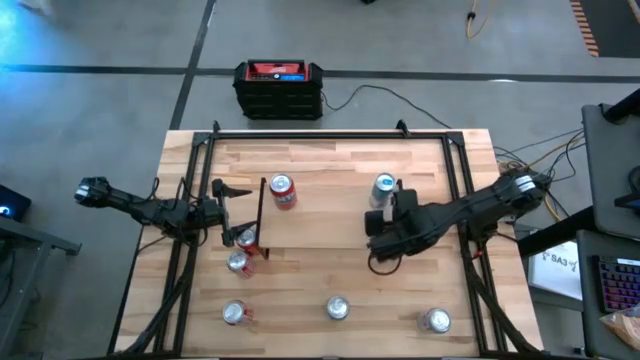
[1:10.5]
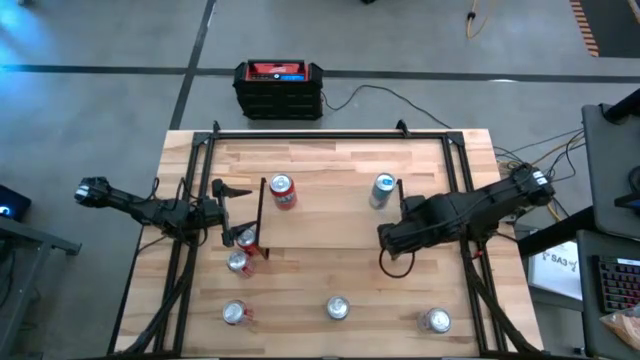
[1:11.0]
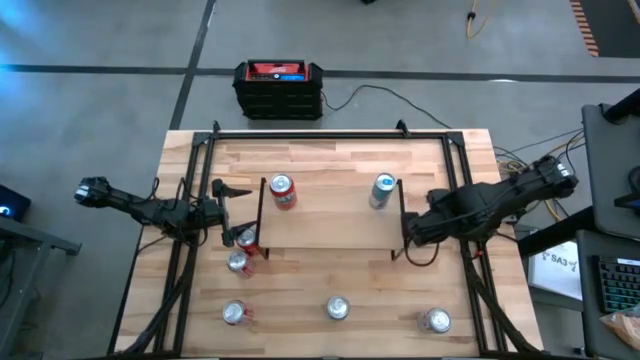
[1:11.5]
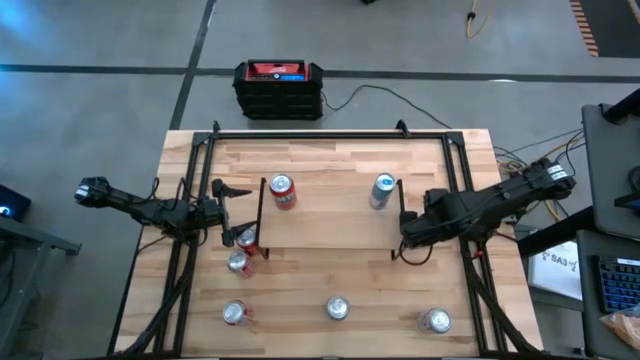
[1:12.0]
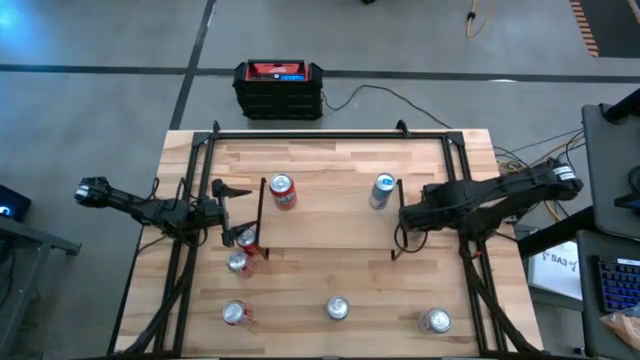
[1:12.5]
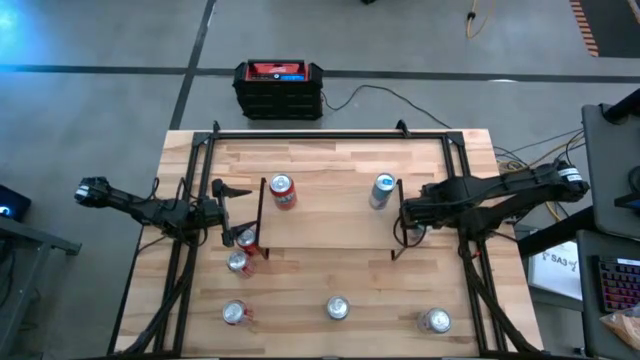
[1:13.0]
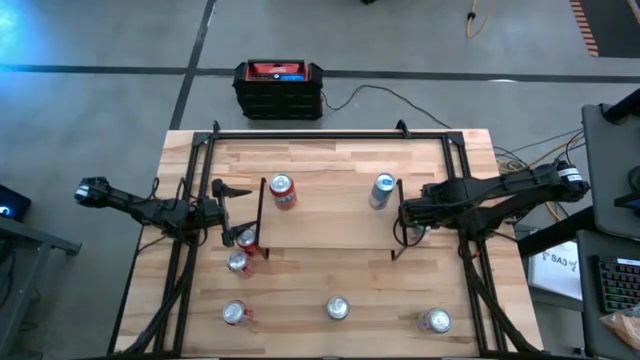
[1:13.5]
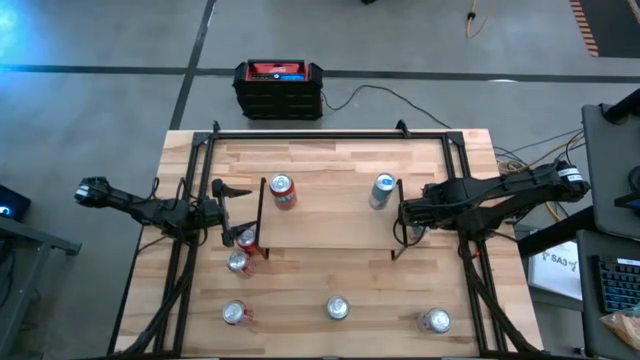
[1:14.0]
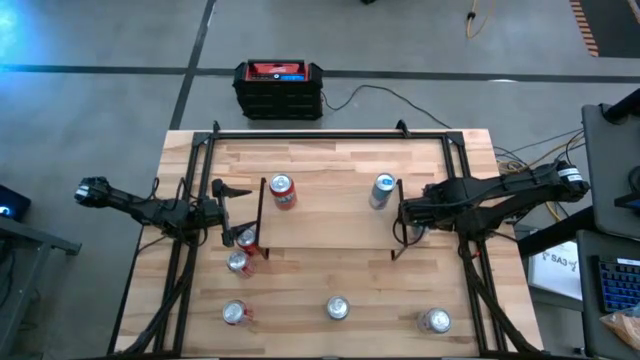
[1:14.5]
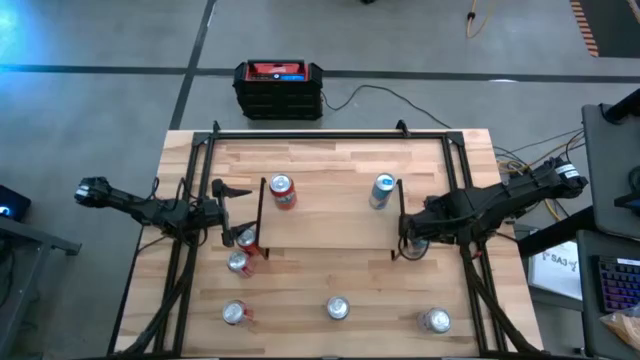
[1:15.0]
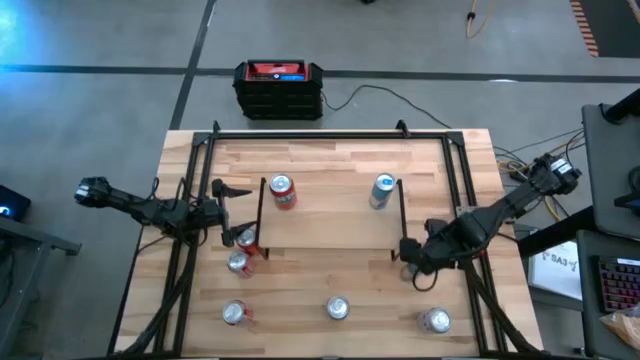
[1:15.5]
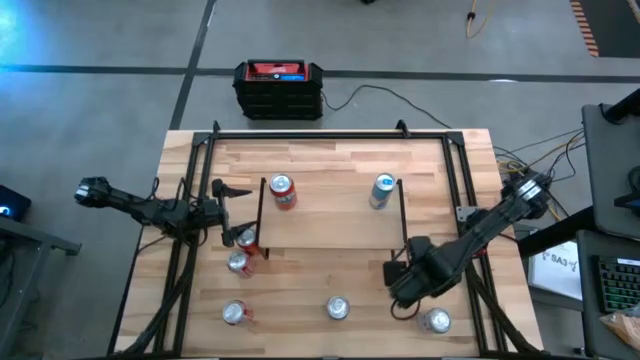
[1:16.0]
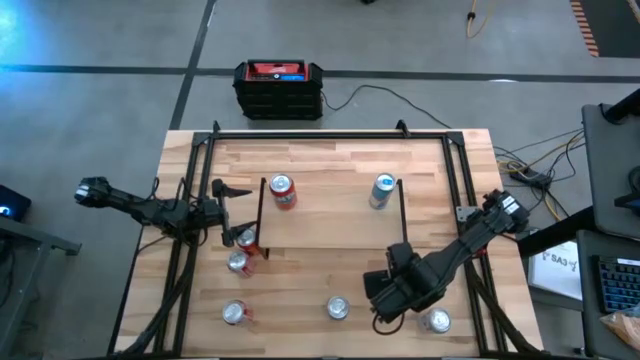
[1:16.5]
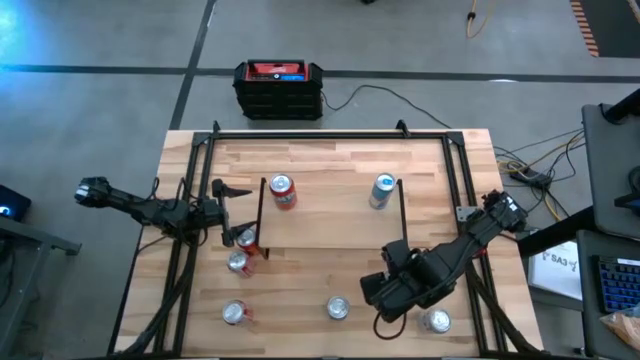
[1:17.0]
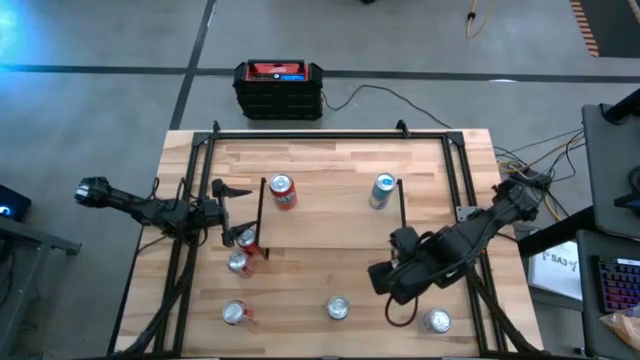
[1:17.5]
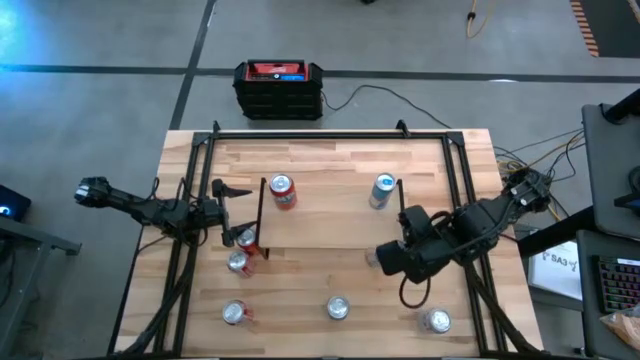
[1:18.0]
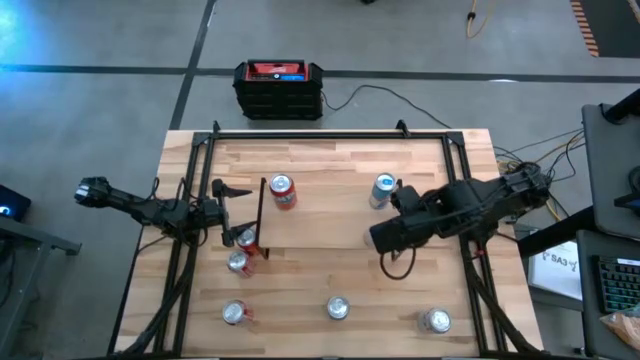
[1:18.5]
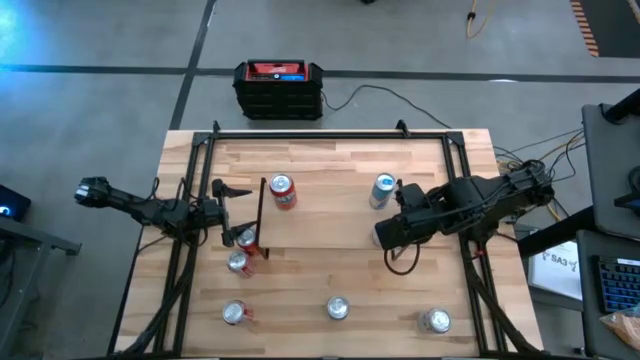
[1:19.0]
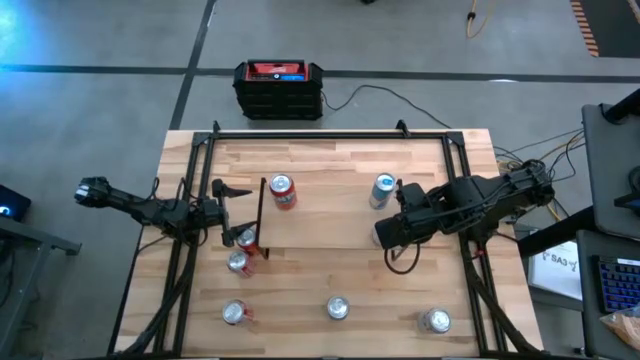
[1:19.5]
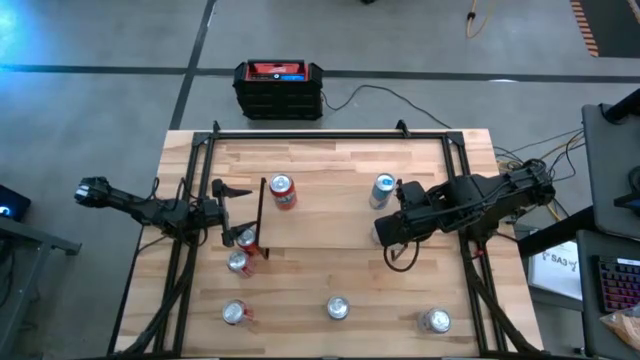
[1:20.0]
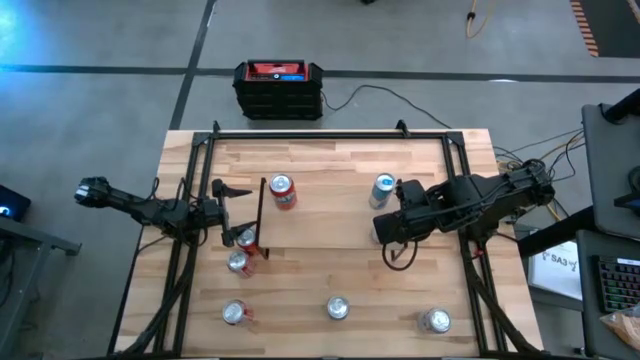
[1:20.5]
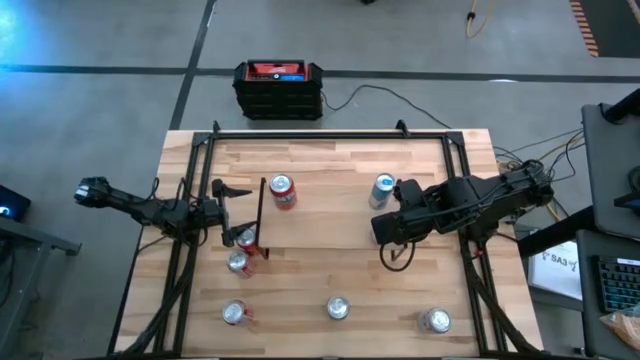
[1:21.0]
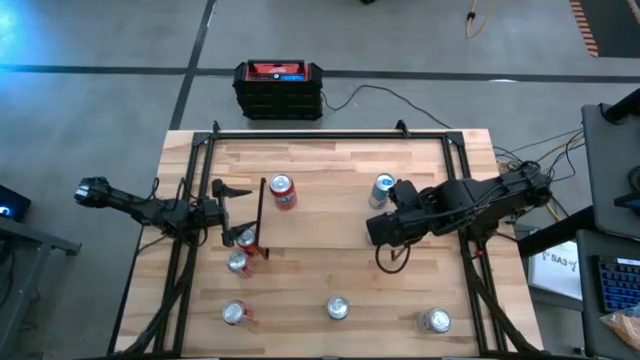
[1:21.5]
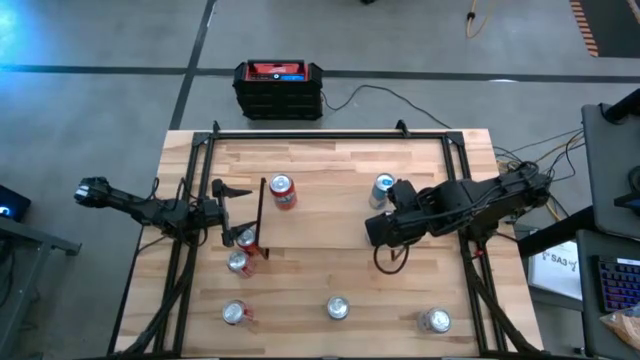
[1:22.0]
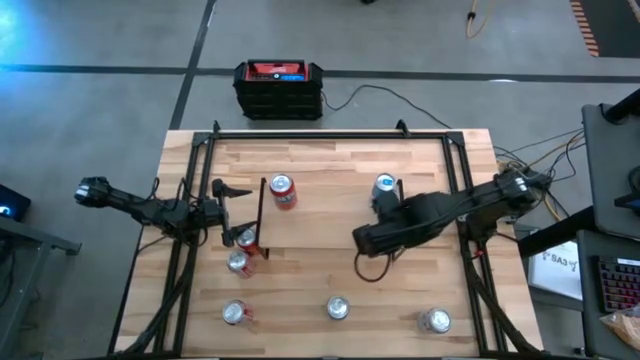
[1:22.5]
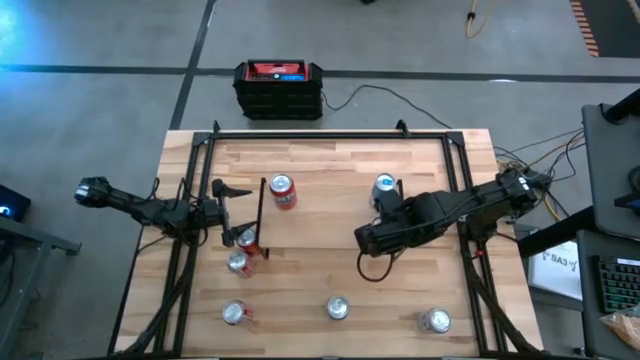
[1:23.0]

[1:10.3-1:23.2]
Task: Place canned beverage on shelf
Put the blue soda can on the shelf aligned with the other blue soda can

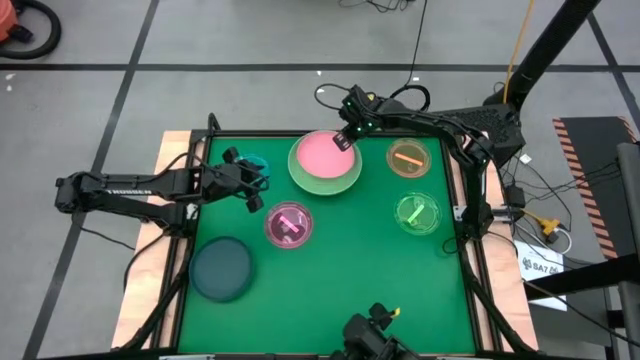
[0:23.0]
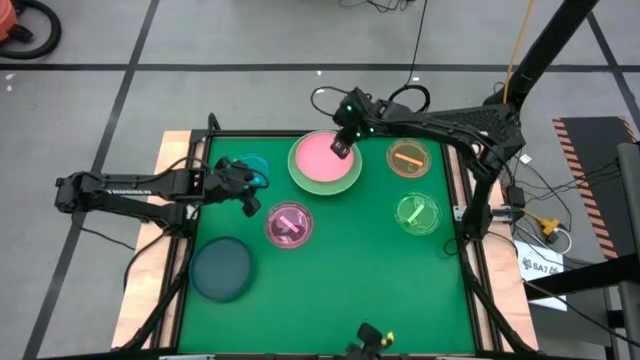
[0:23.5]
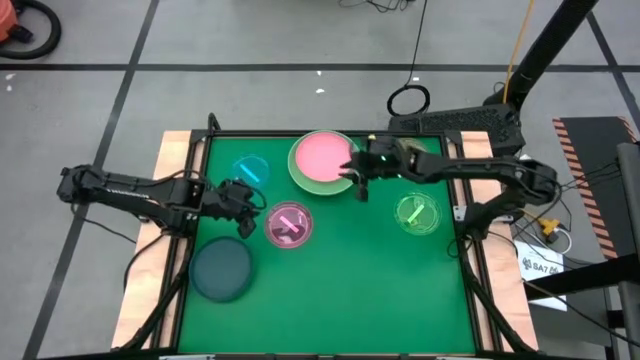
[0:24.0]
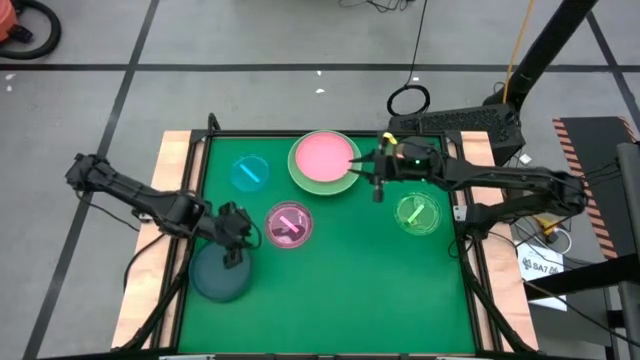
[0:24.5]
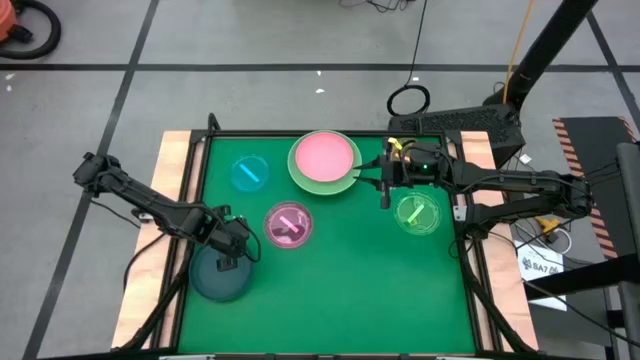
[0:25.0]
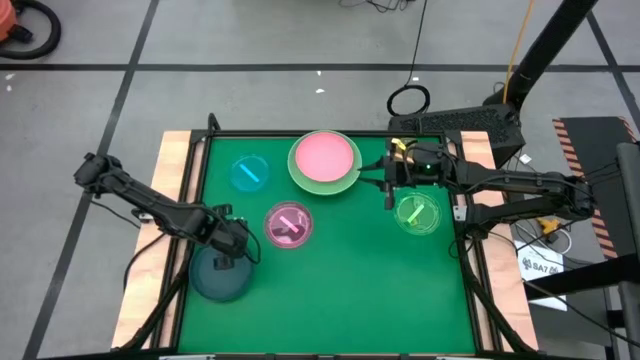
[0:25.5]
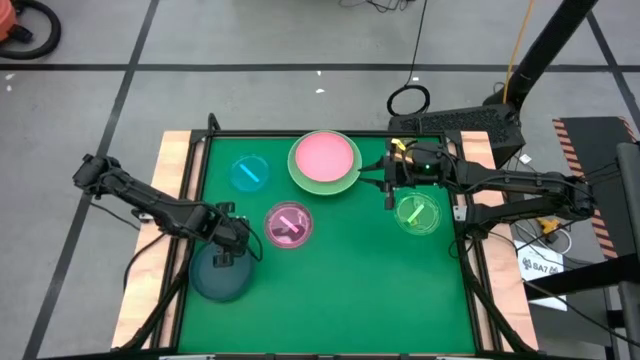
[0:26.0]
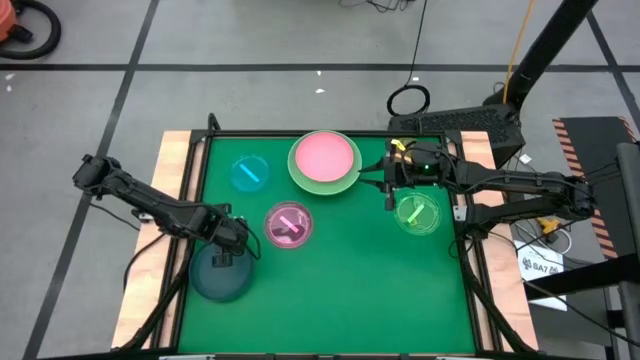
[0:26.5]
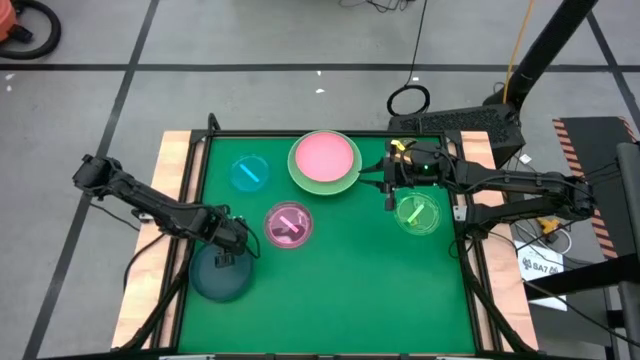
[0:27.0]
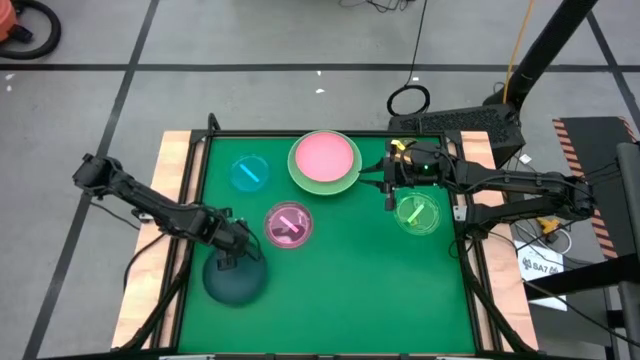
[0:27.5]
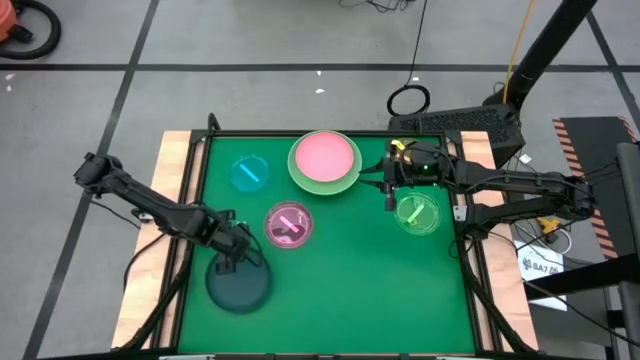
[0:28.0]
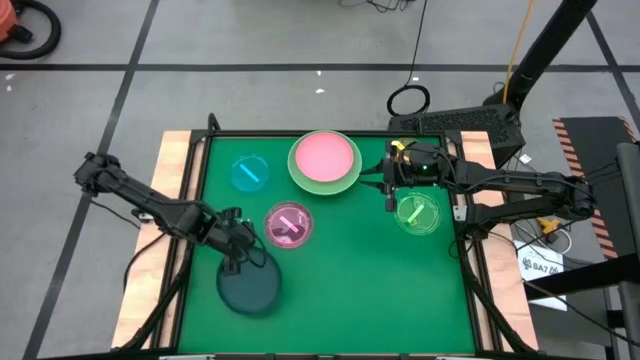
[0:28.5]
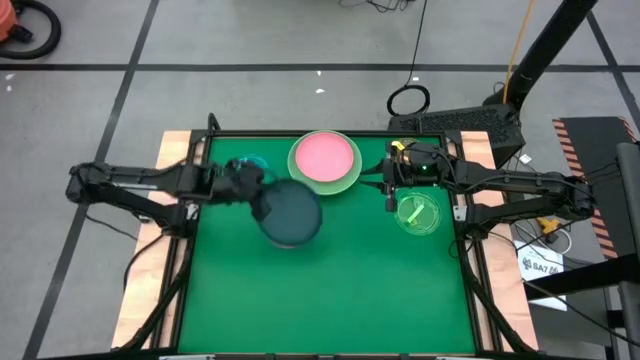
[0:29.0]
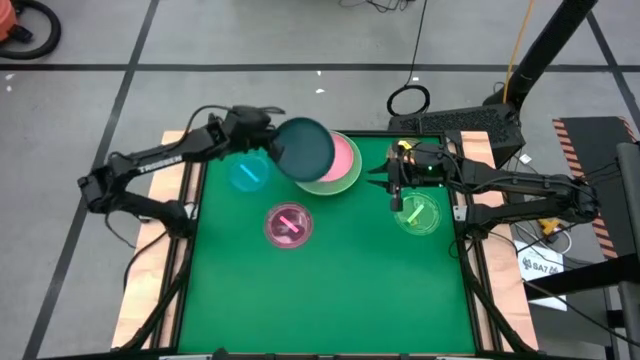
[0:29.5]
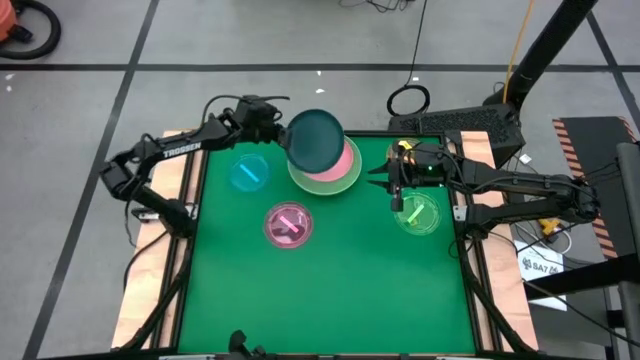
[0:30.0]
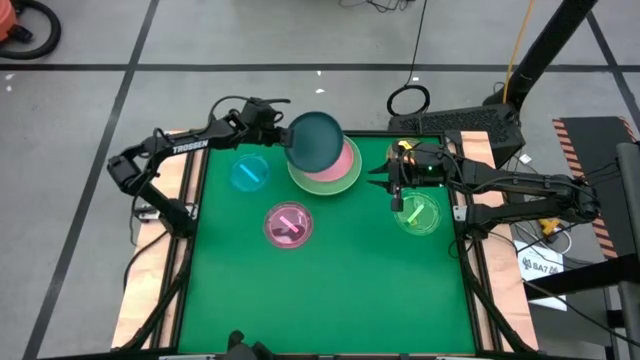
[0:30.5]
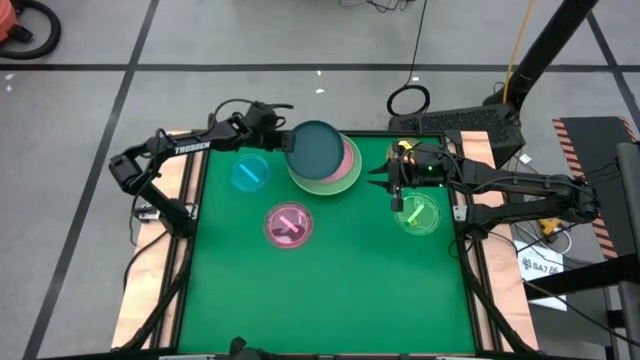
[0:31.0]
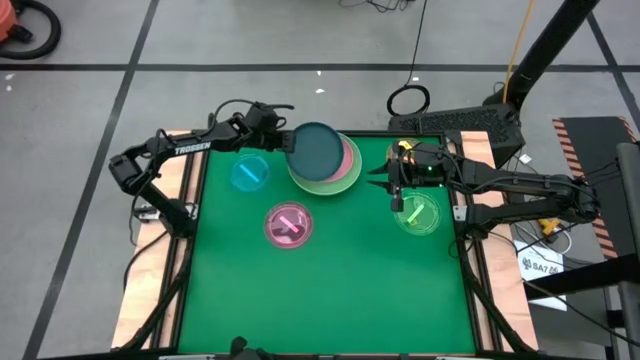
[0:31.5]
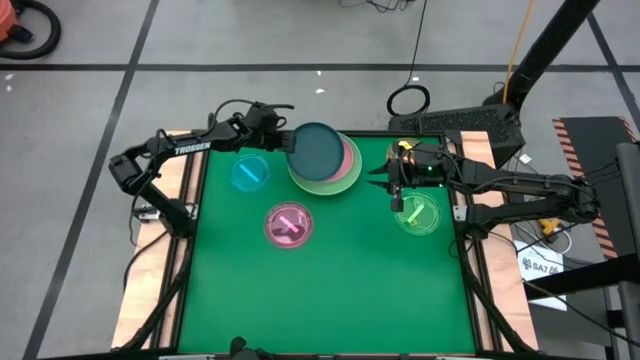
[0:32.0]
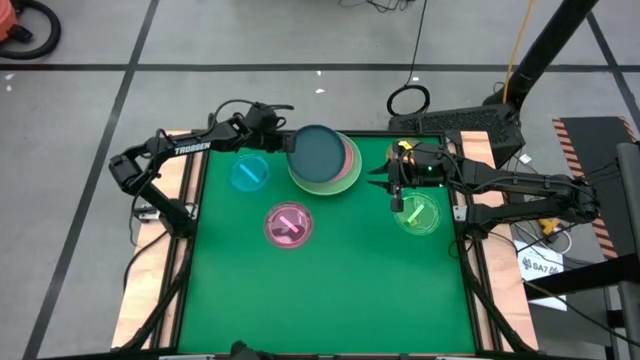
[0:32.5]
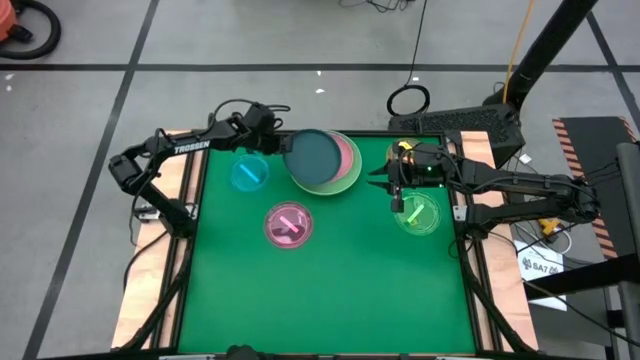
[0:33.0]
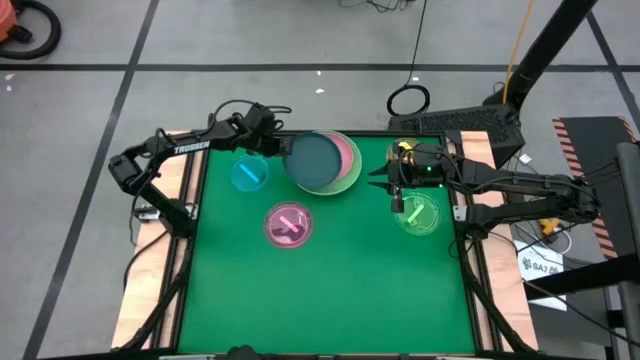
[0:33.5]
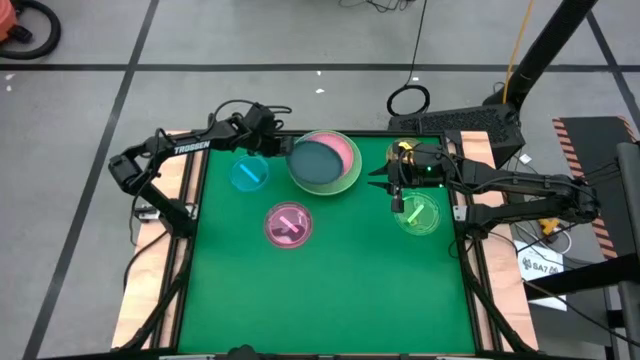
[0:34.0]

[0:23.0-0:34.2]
Task: Stack plastic plates
Stack the dark blue plate on top of the pink plate
